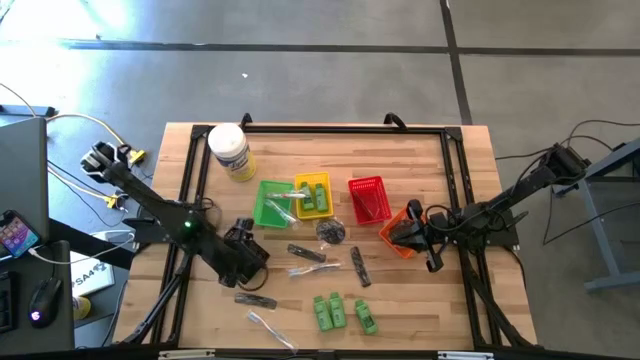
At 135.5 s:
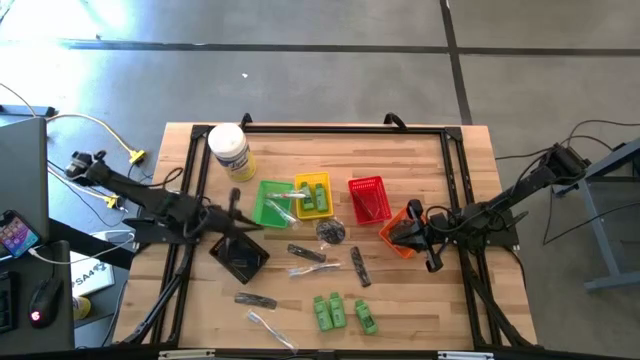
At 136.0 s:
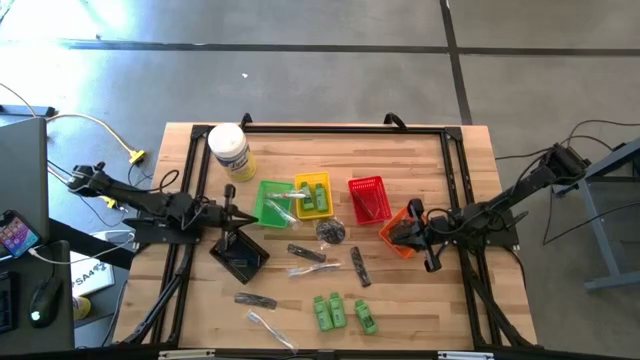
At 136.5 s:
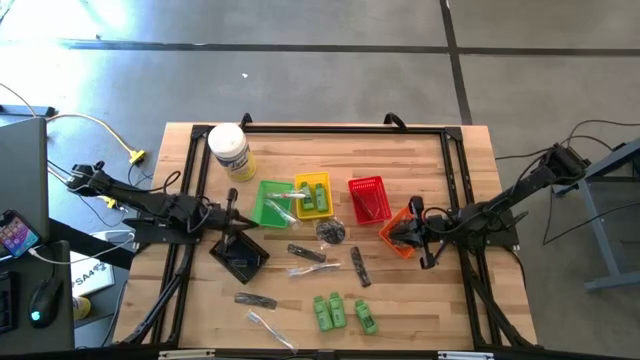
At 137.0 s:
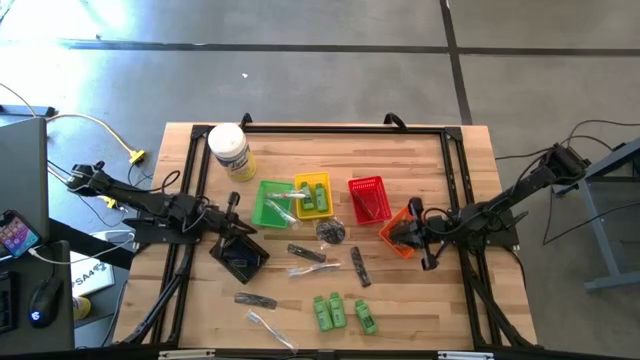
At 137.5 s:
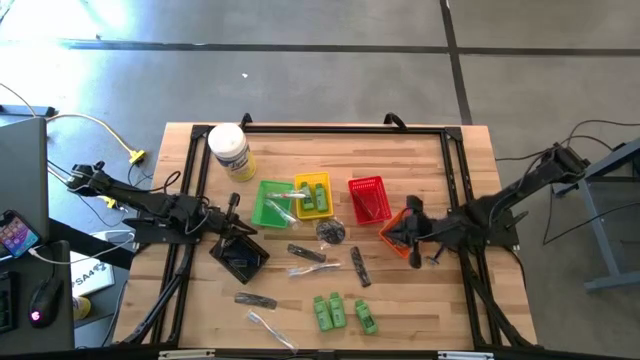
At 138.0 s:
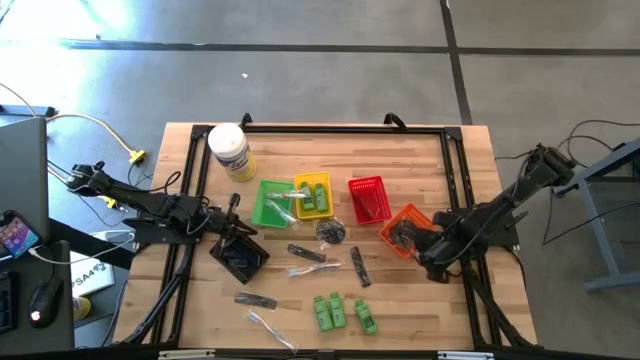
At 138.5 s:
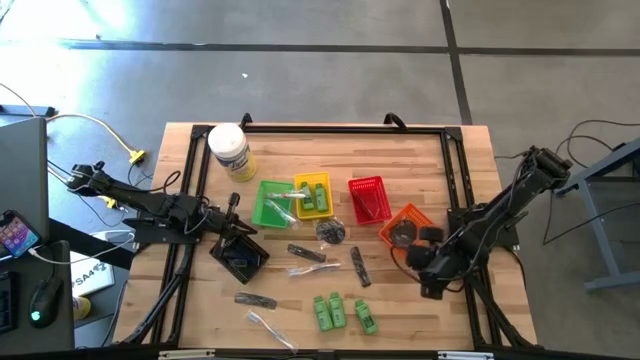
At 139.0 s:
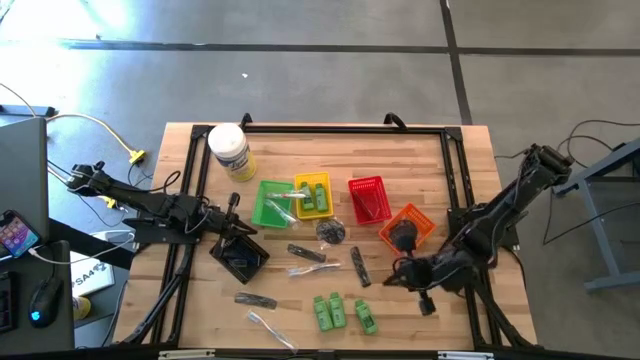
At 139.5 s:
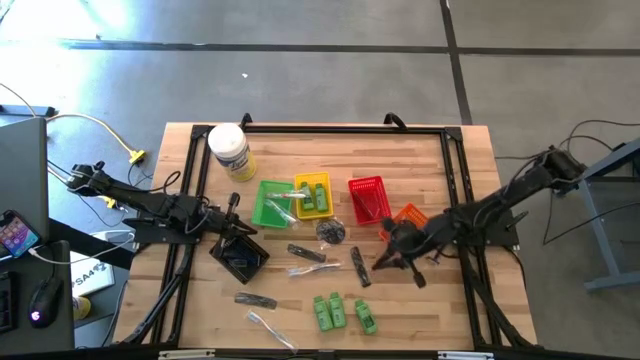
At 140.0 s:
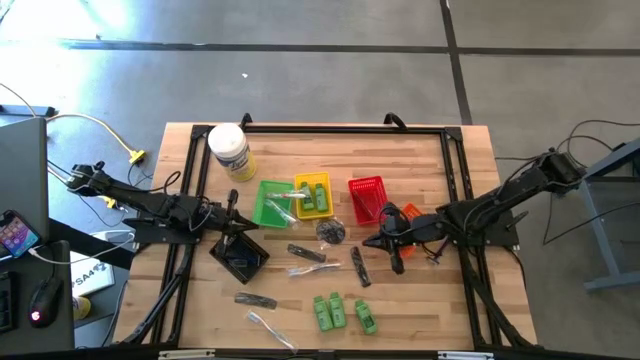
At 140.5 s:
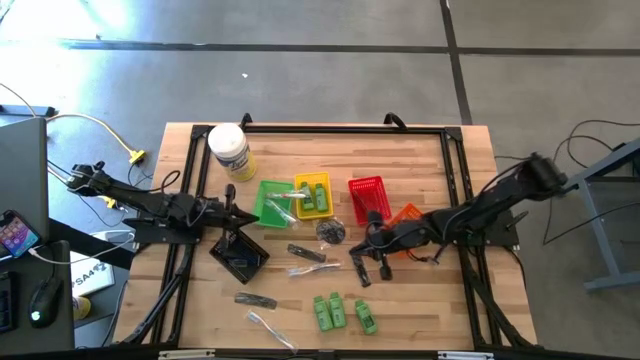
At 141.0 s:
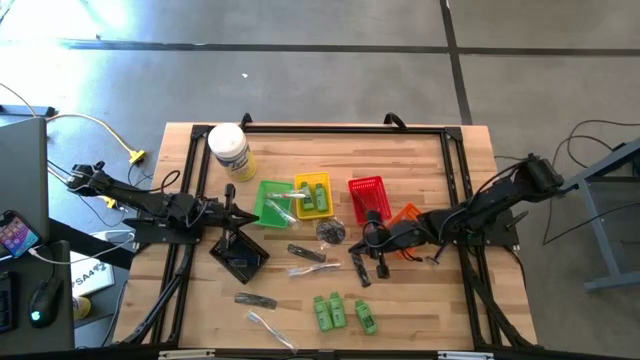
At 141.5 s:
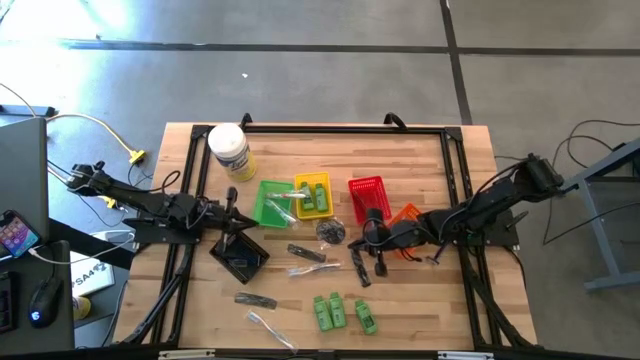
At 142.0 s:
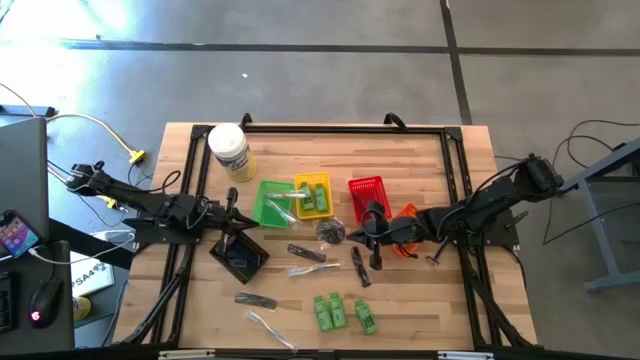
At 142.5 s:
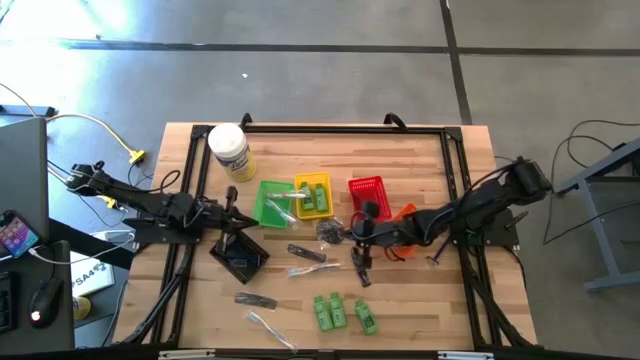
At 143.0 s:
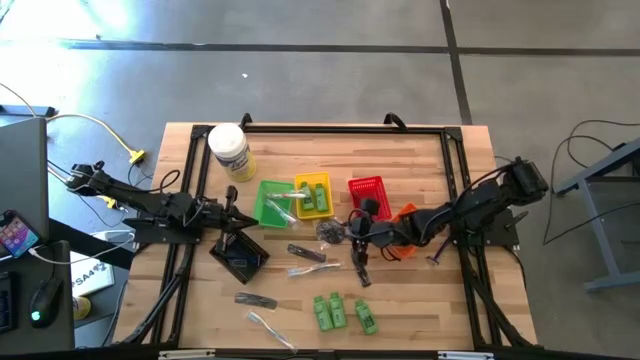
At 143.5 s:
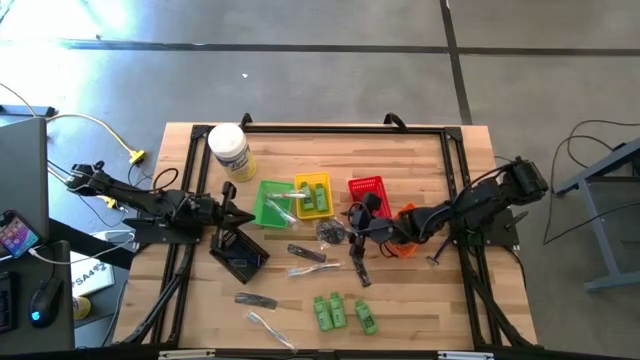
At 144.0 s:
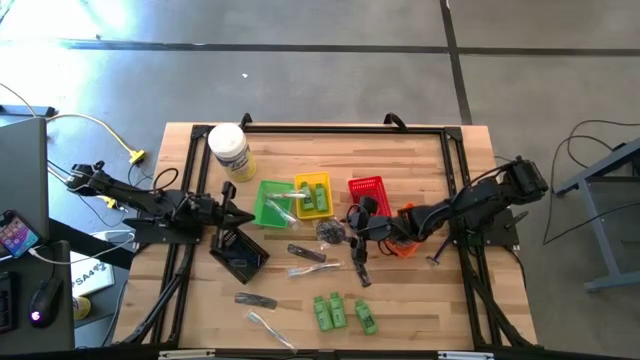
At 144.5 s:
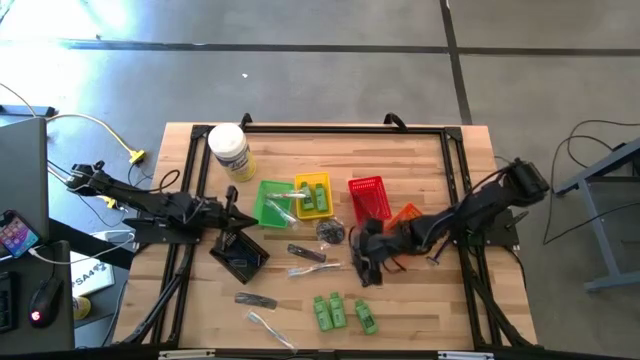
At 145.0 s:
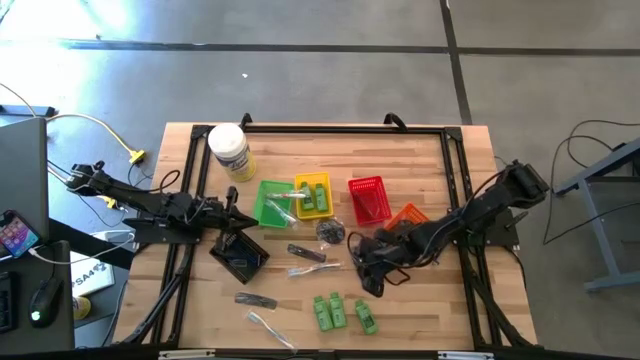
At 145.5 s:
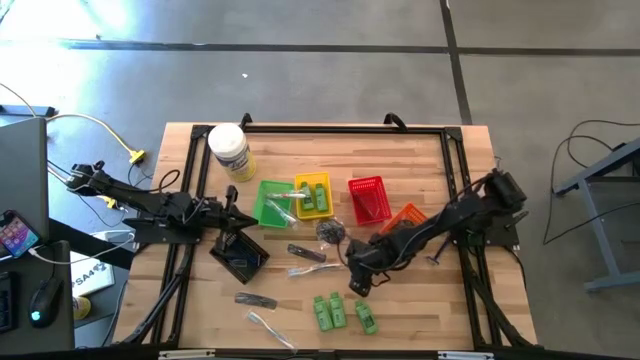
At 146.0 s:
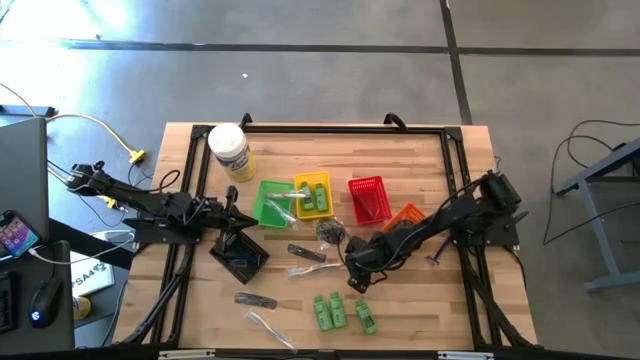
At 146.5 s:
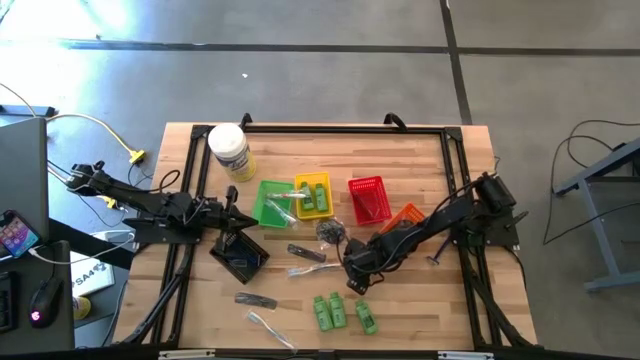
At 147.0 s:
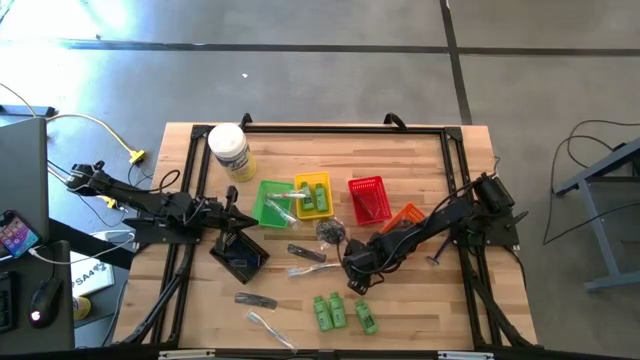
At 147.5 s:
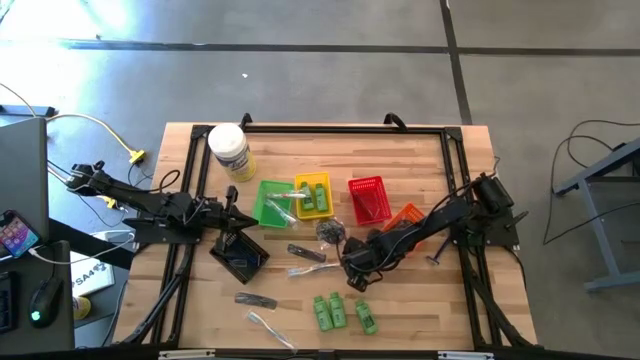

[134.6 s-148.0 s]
Task: Pick & Place Travel size toiletries
Put the top right black comb into the red basket

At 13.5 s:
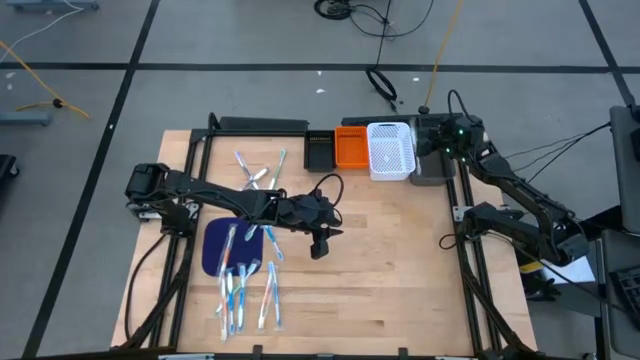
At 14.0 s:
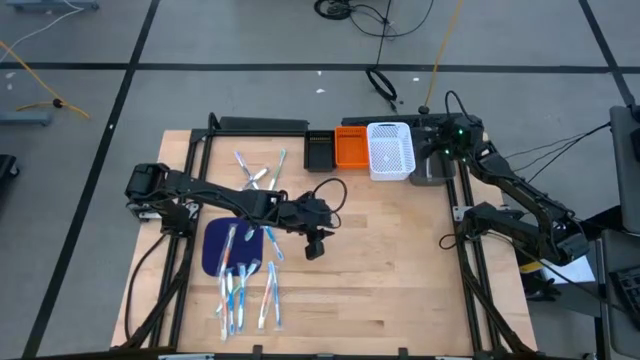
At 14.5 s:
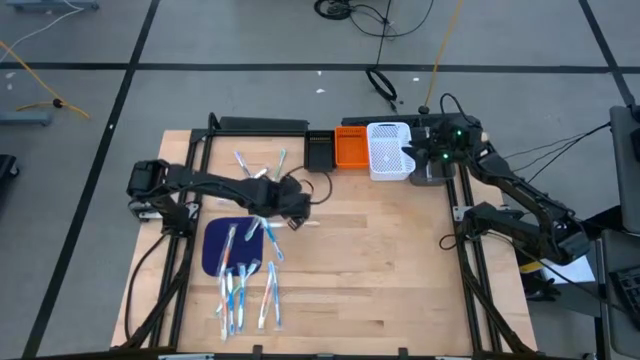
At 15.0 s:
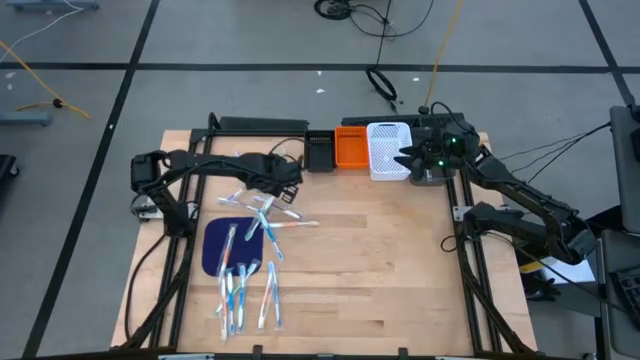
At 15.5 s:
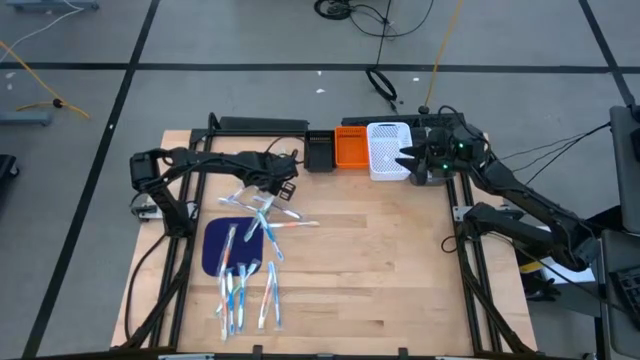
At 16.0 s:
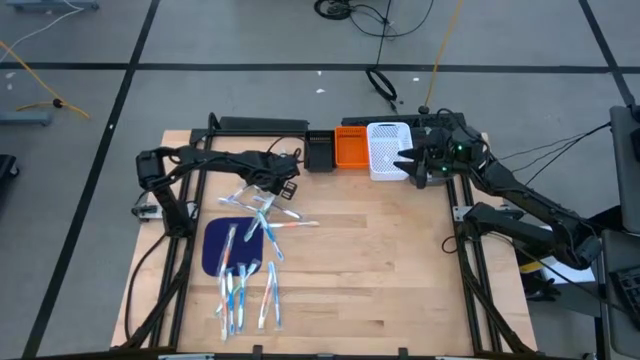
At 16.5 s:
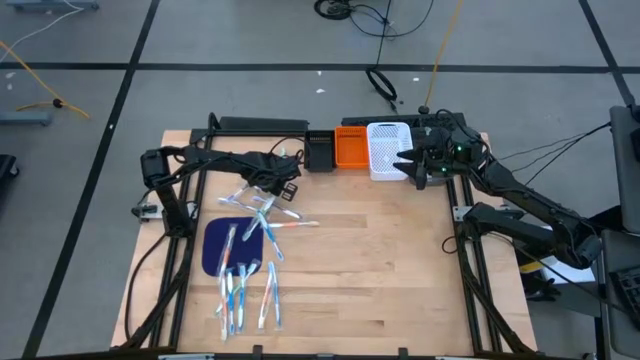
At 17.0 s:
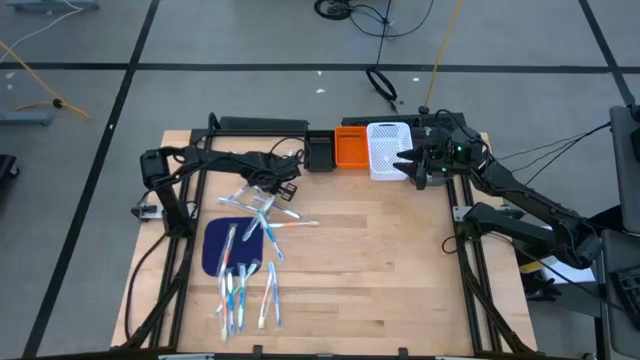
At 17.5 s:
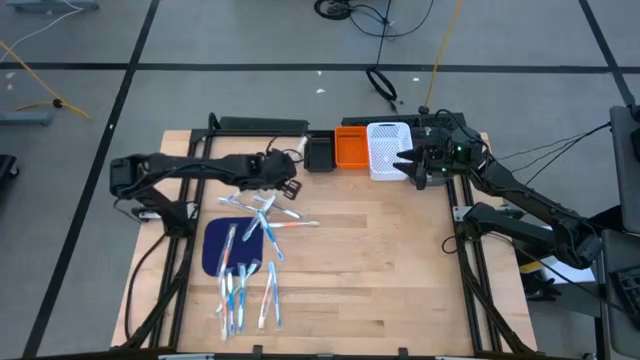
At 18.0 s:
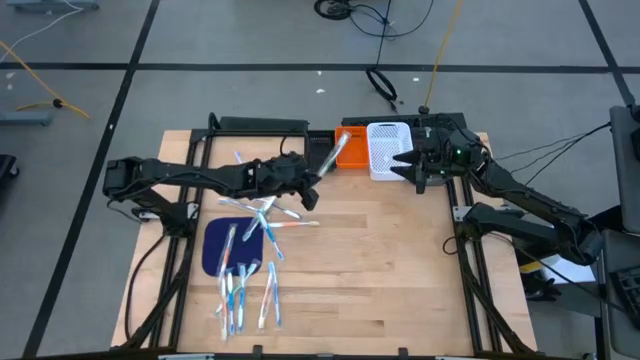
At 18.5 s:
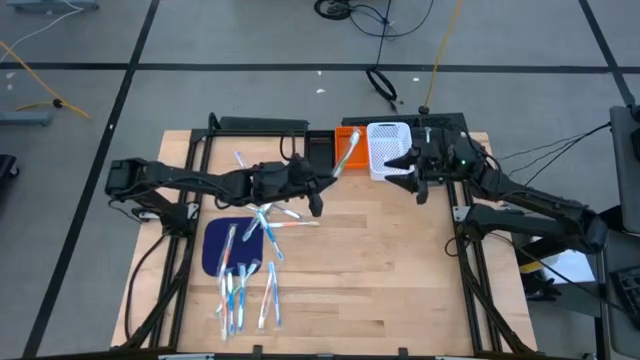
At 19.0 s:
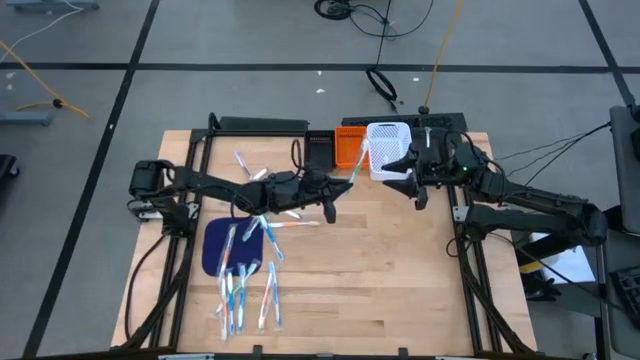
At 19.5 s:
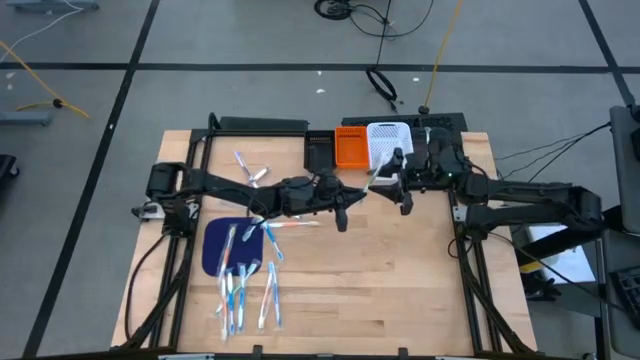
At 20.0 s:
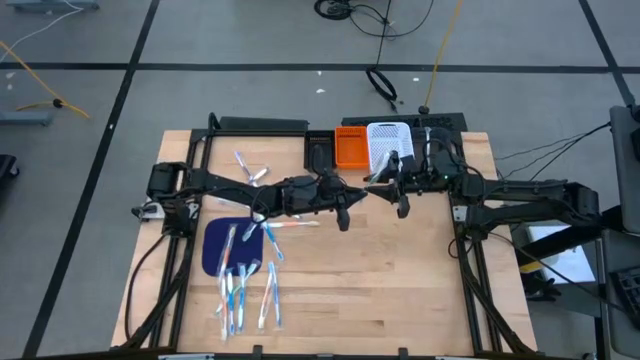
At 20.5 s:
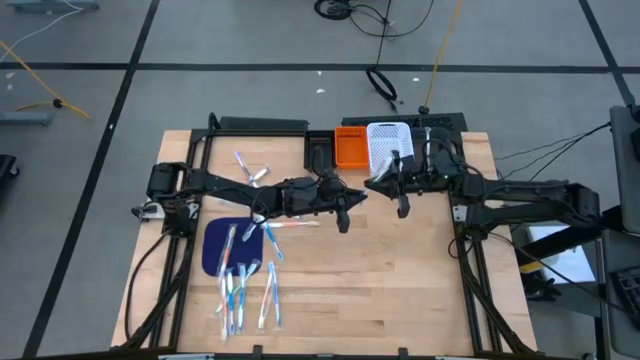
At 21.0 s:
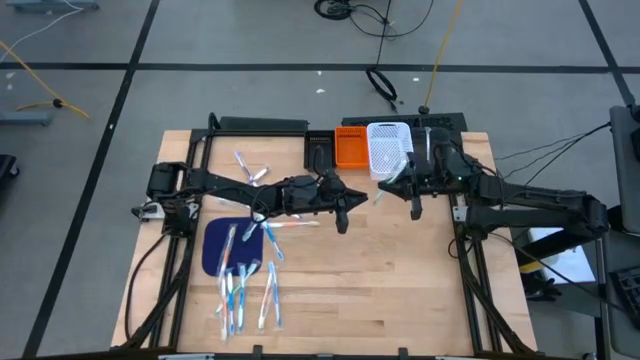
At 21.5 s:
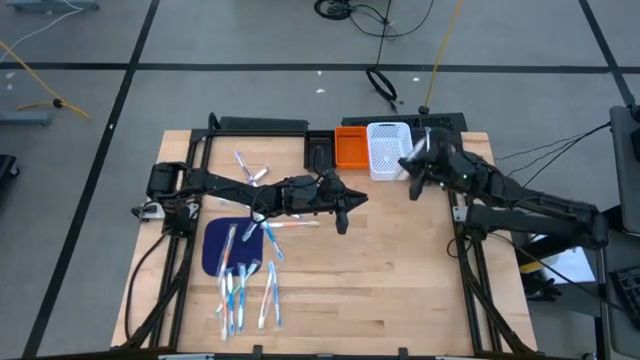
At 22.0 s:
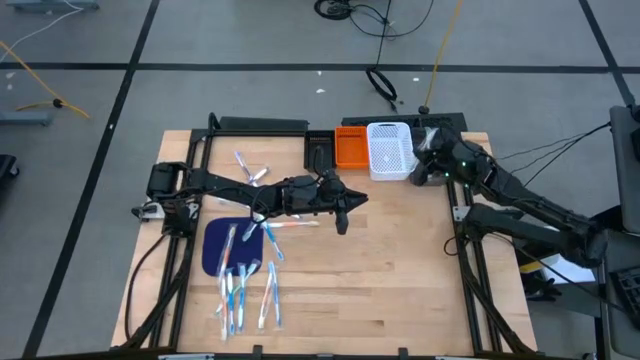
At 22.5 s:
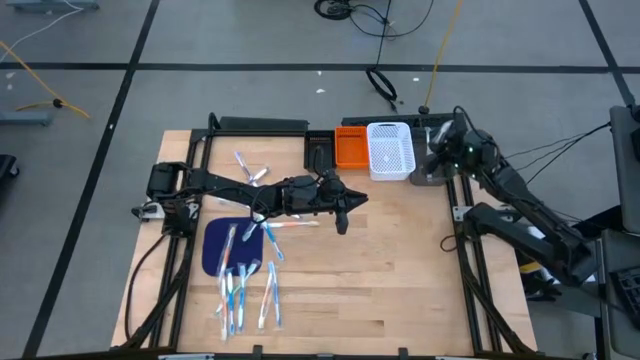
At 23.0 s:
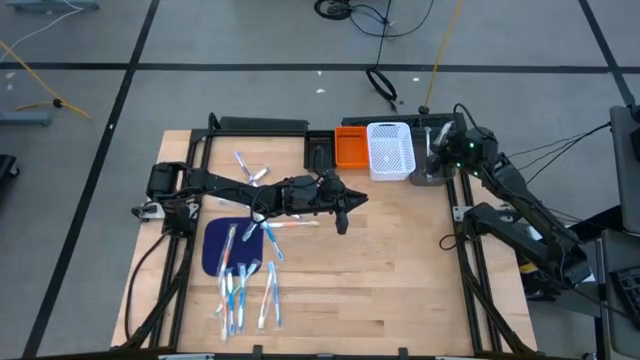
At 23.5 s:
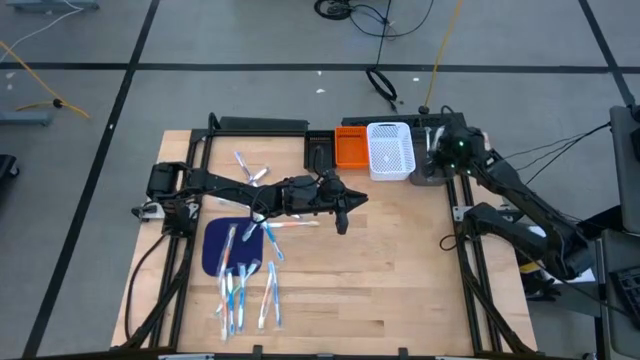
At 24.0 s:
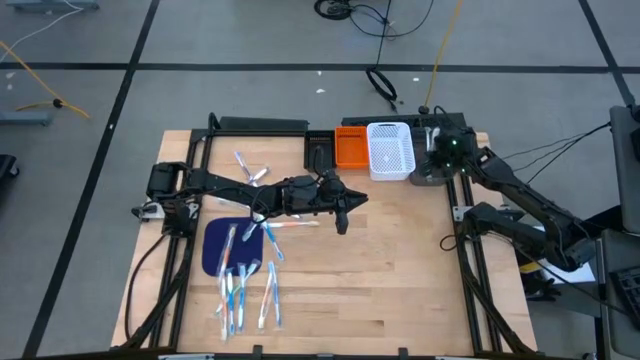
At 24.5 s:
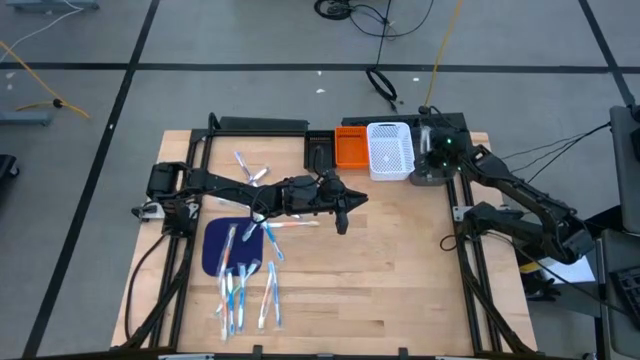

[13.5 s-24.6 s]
Task: Pick & Place Toothbrushes
Put the green toothbrush into the gray bin
